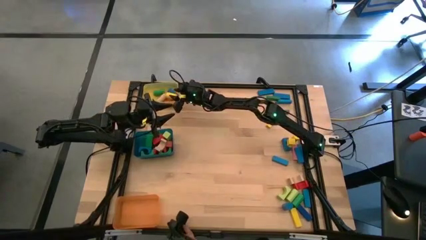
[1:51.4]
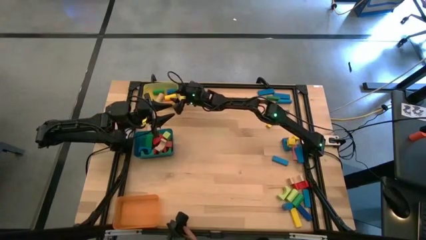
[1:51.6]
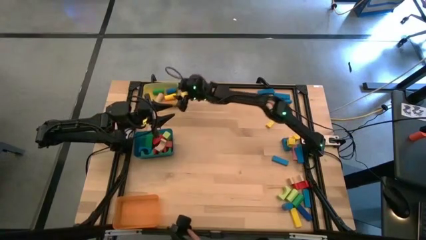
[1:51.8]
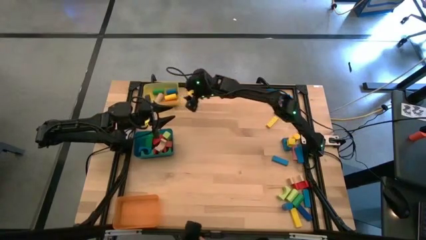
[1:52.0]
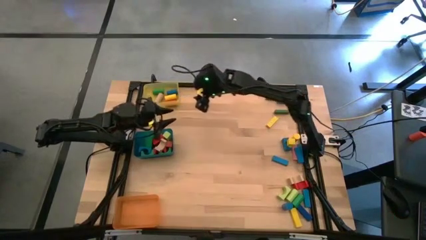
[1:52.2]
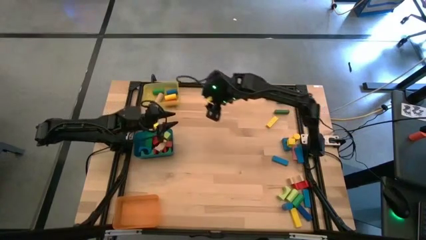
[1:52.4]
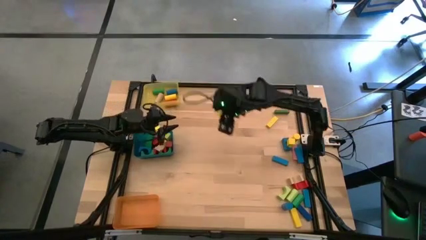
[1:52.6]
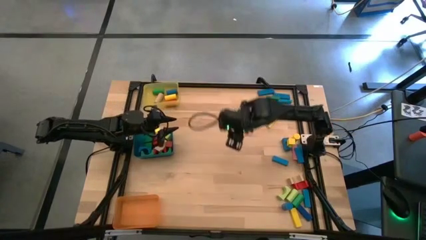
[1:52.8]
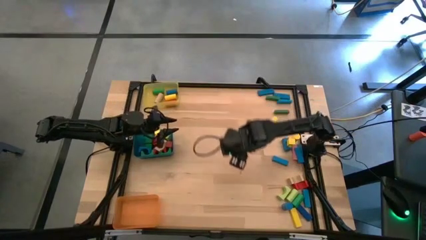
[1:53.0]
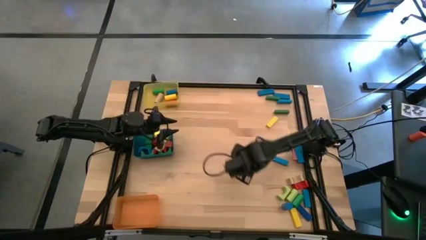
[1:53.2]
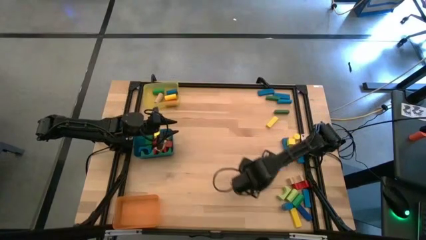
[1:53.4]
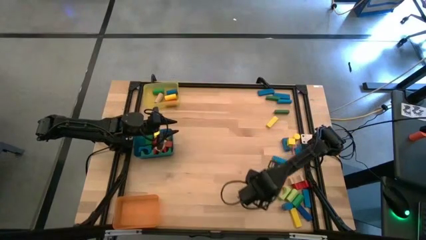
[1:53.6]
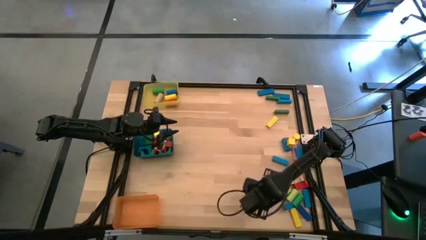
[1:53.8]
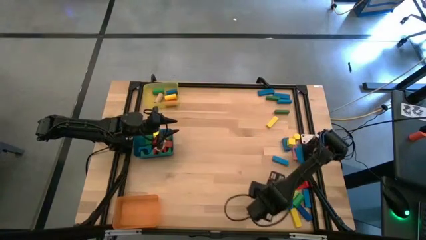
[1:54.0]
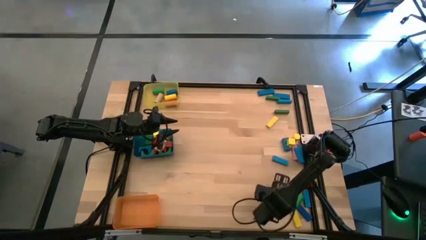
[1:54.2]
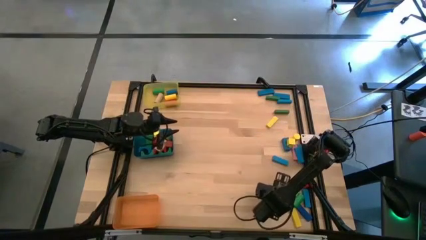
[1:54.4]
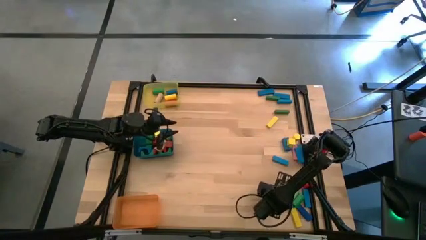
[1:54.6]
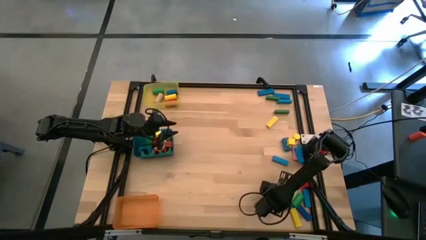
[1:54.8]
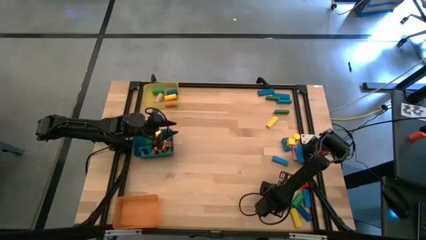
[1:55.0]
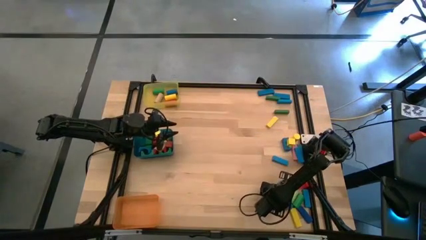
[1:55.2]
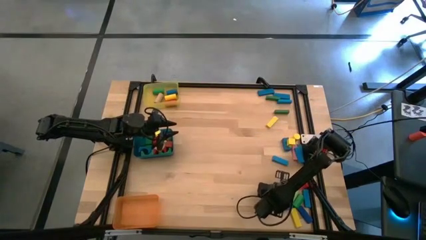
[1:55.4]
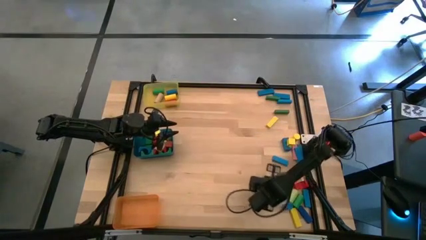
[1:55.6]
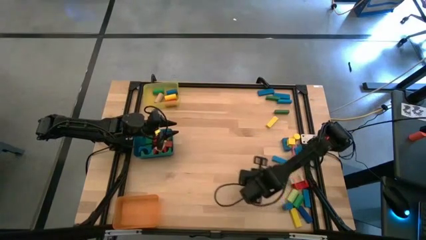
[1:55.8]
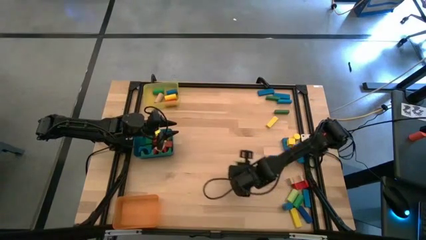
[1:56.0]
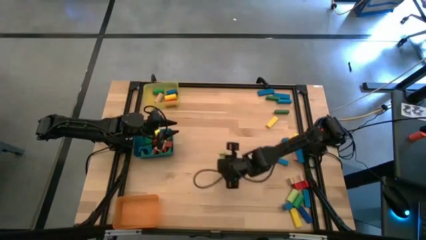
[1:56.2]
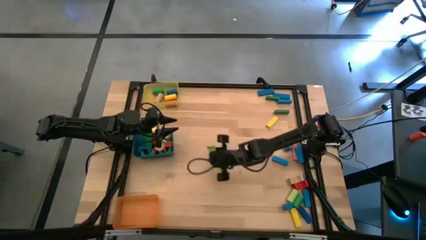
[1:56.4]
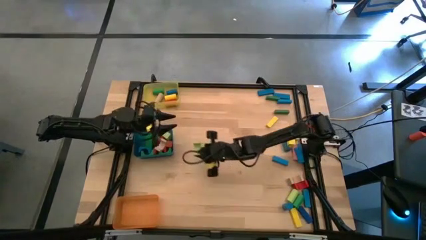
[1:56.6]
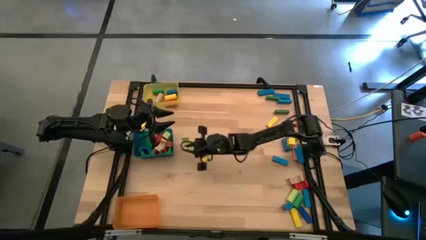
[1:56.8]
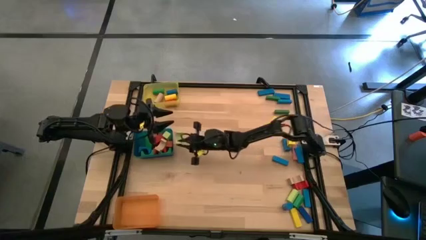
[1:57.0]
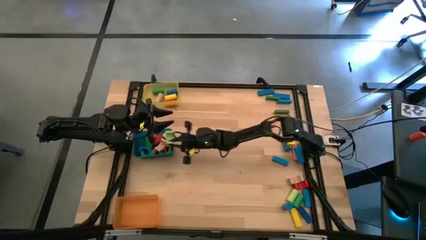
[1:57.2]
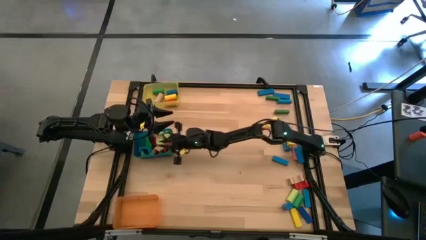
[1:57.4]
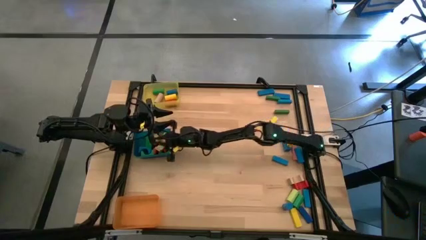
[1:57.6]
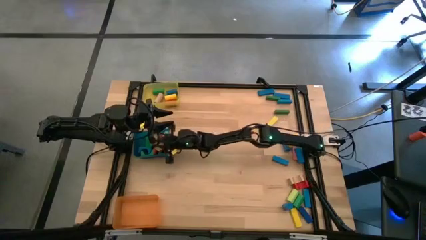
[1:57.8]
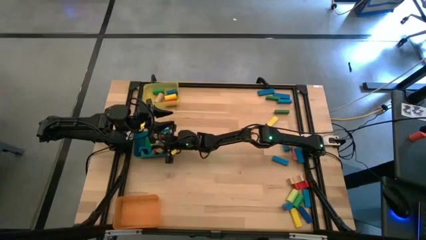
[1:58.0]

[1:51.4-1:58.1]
Task: Sort blocks by size
Put the light green arch block into the blue bin

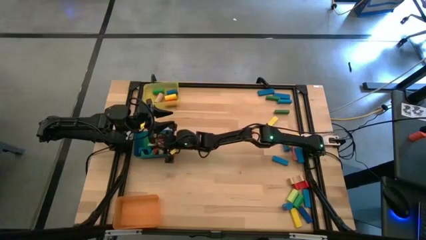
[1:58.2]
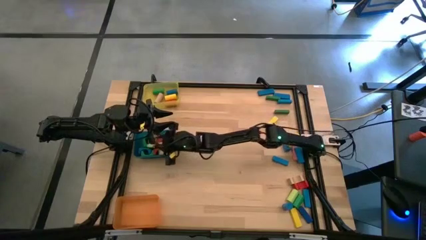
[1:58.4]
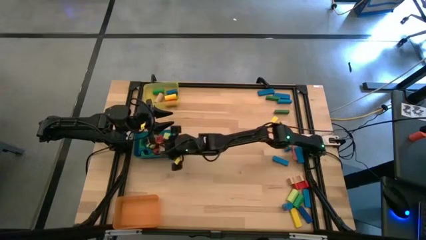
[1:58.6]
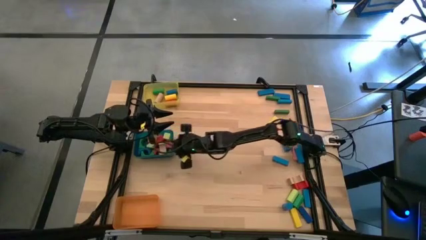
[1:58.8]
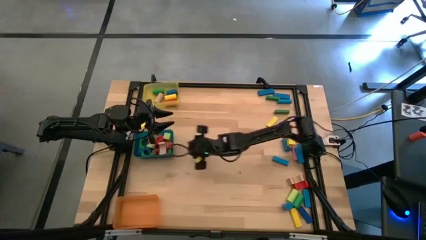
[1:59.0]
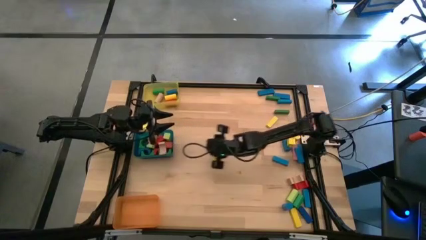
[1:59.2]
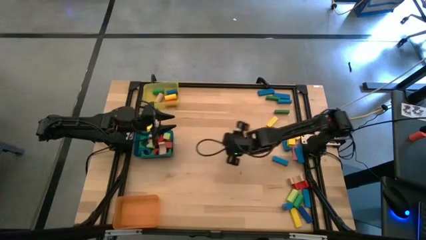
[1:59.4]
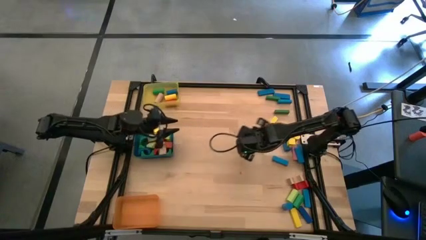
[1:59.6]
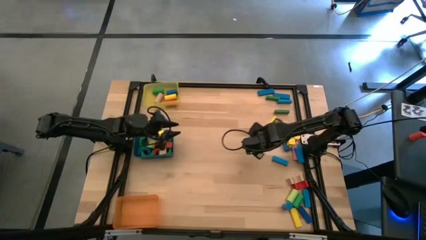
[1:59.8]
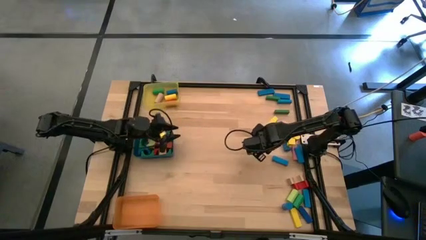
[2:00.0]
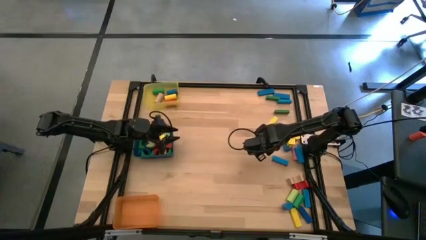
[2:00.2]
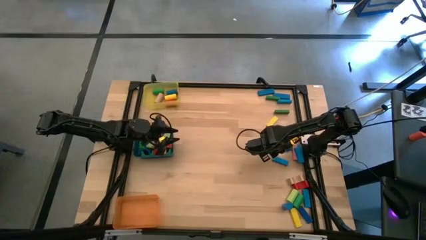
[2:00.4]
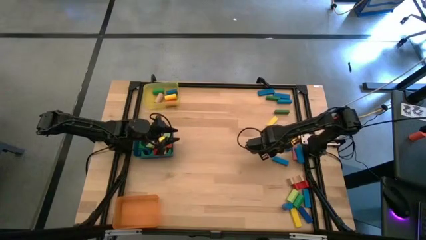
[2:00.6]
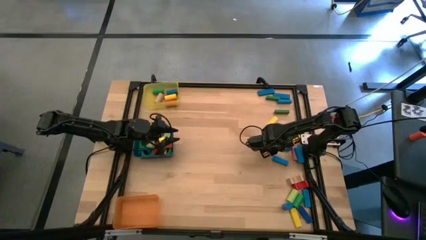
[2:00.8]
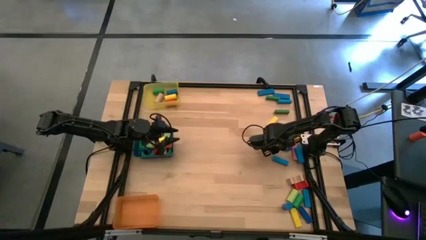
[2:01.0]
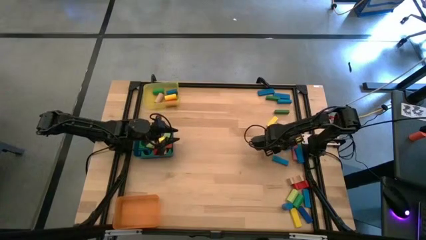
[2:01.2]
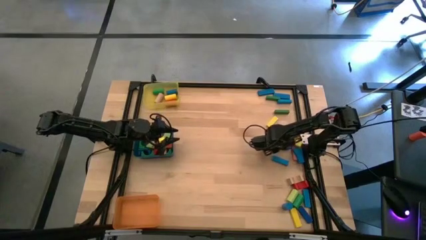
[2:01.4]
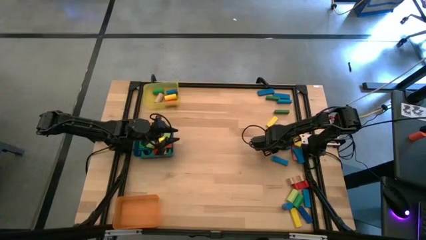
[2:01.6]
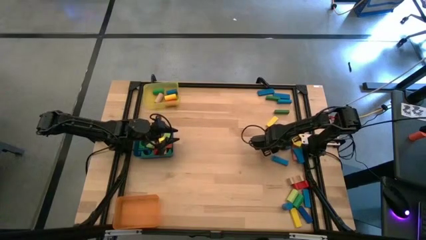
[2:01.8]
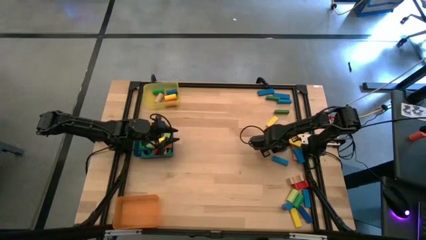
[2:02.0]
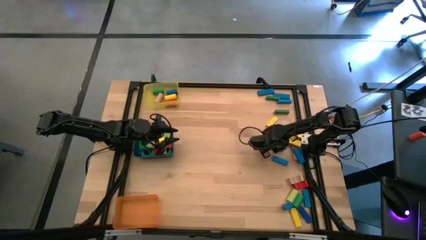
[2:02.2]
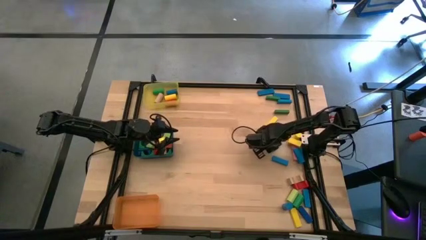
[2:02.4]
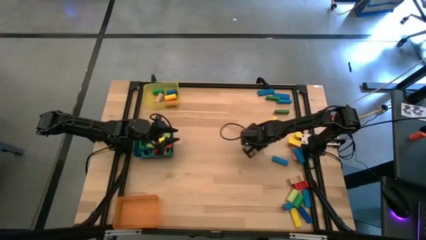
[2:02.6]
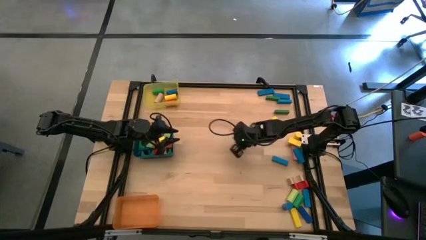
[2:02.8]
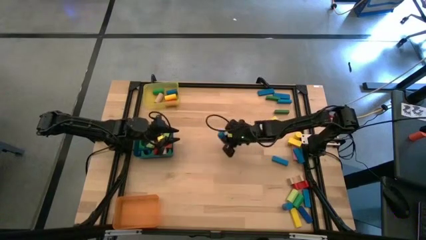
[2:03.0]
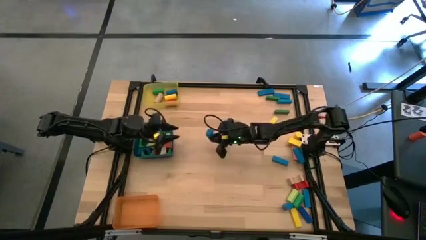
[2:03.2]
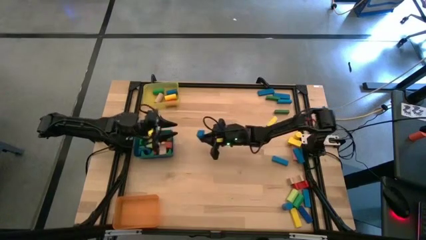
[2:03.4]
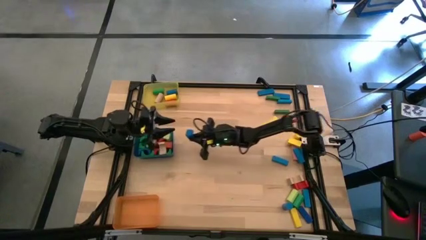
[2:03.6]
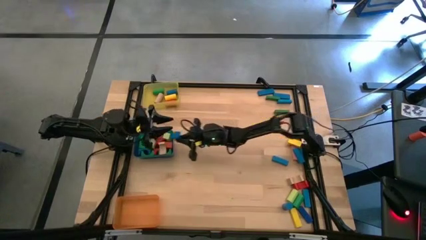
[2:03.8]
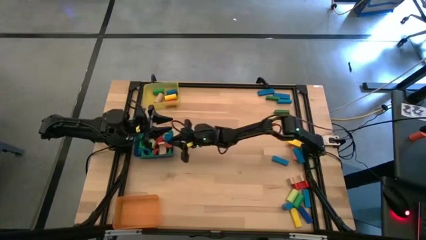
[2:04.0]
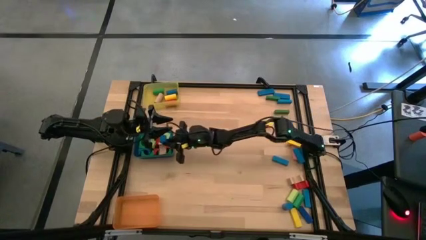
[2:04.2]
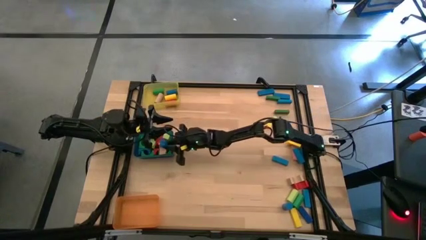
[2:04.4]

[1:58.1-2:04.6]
Put the blue arch block into the blue bin

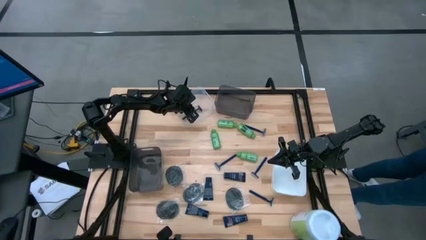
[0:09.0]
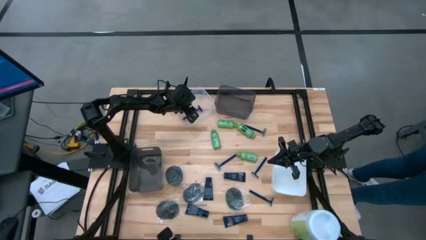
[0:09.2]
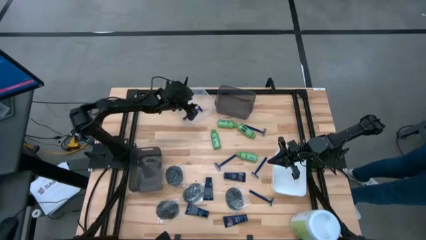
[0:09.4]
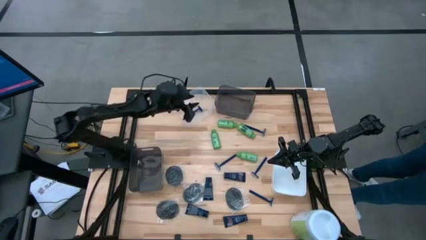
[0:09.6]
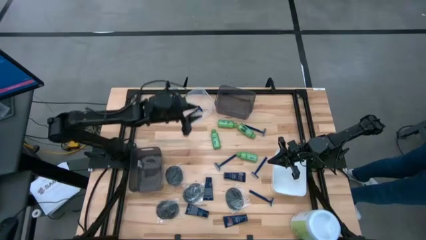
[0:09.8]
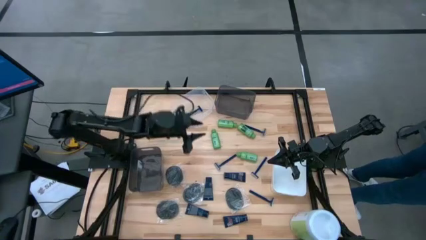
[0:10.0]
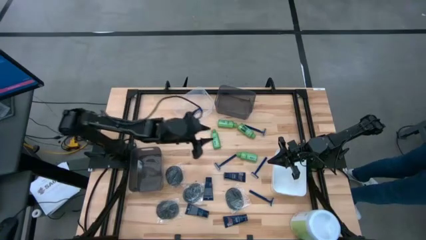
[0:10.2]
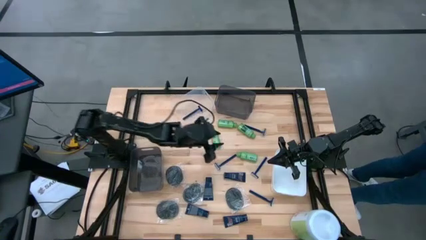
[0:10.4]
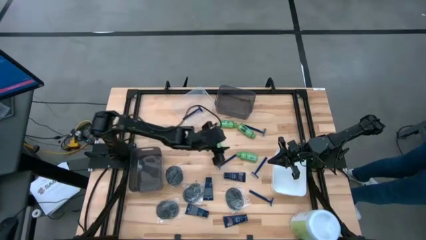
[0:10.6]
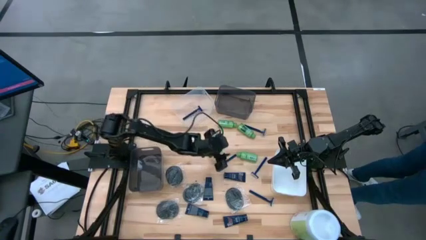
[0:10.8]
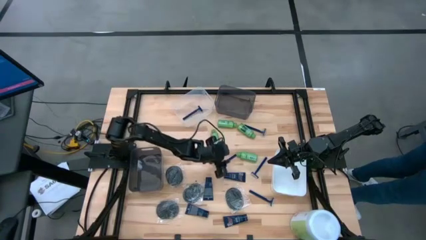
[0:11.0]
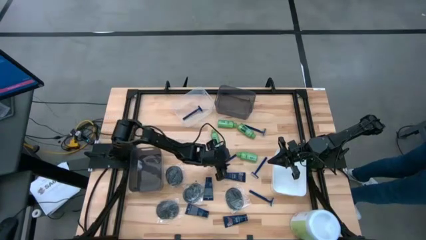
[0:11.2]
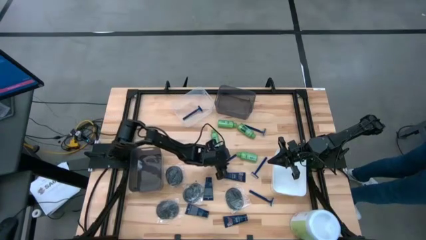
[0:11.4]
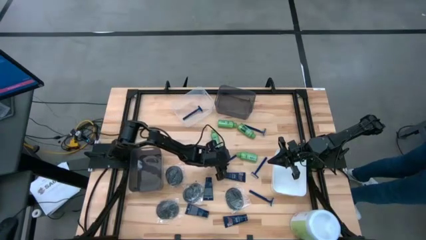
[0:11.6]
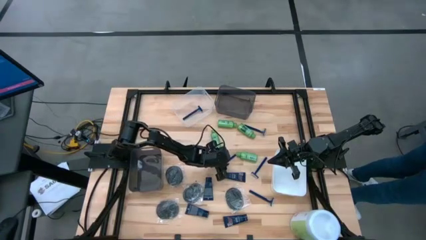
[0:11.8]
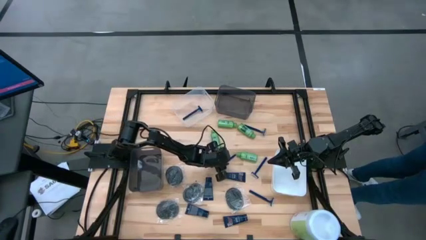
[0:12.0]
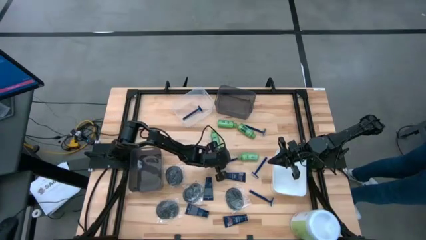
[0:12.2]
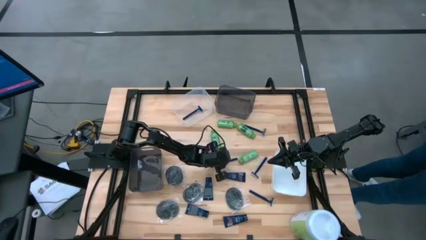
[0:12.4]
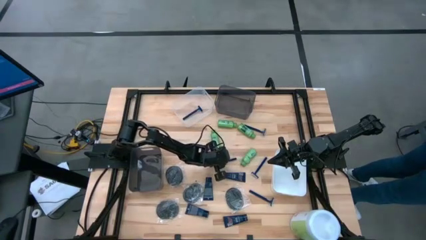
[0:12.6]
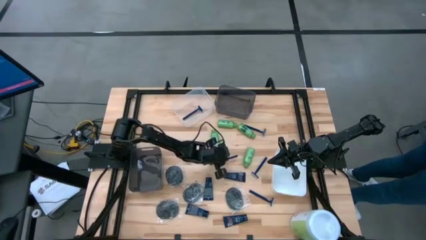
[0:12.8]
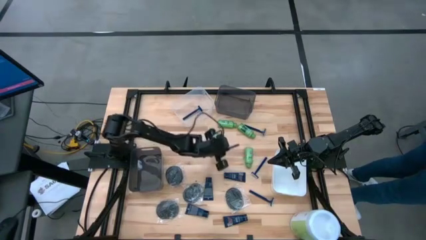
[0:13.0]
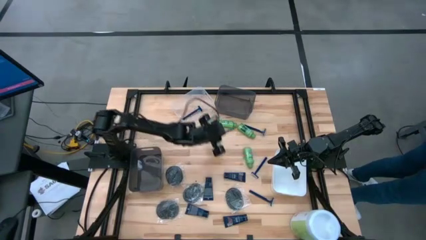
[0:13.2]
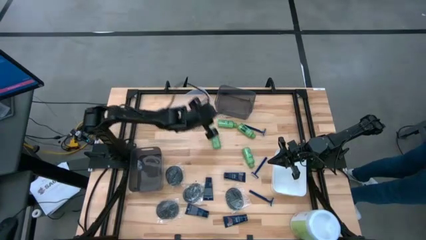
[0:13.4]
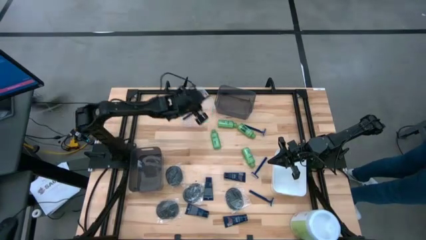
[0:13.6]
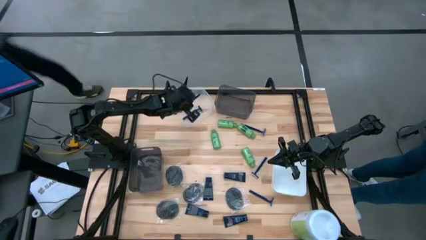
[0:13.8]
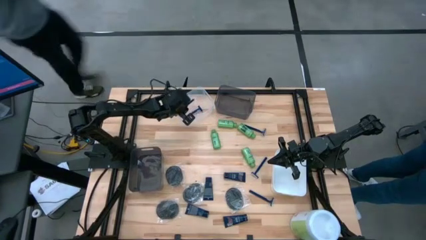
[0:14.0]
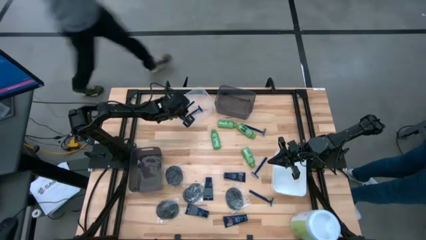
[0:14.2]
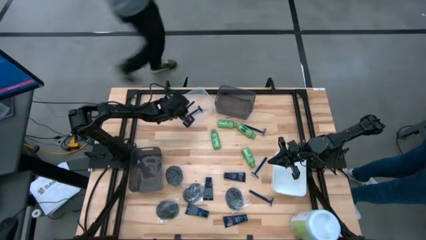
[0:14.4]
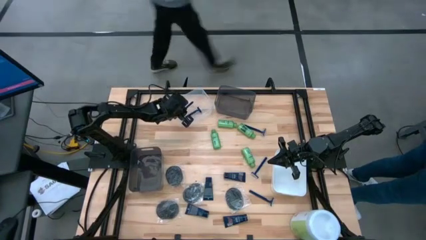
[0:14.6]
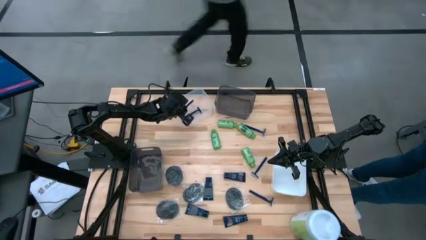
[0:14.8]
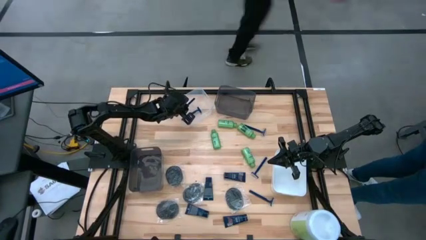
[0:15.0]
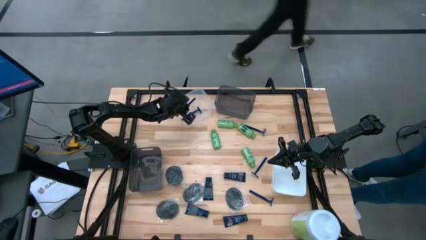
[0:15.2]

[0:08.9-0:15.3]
Task: Pick & Place Travel size toiletries
Put the blue razor into the white transparent bin
